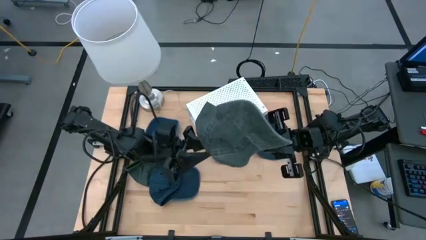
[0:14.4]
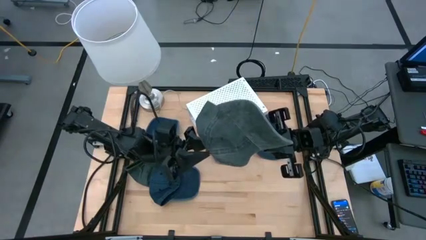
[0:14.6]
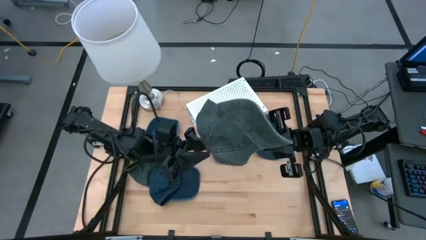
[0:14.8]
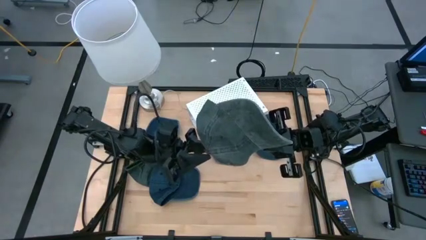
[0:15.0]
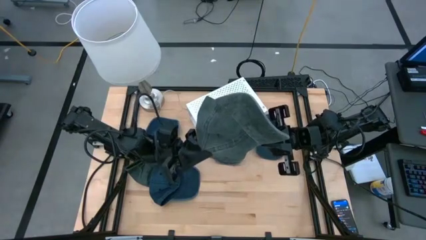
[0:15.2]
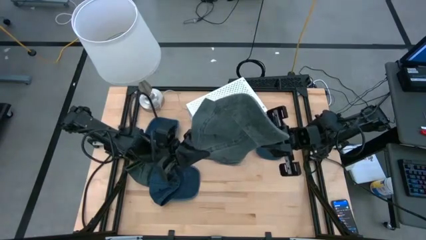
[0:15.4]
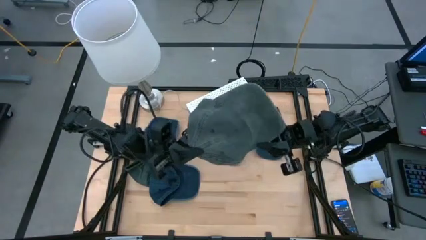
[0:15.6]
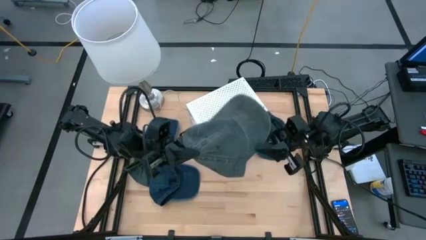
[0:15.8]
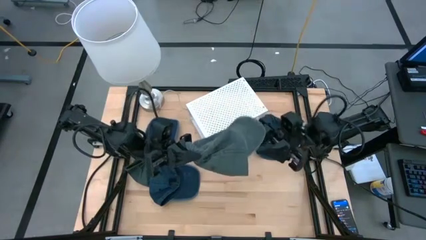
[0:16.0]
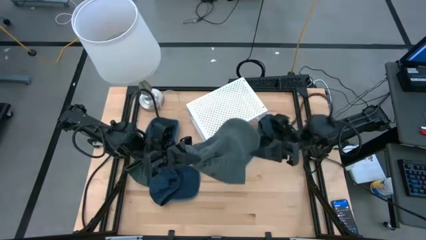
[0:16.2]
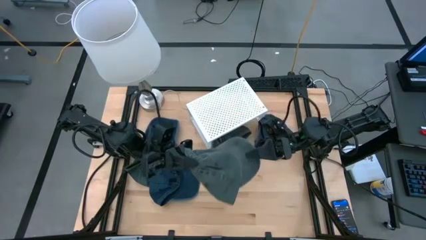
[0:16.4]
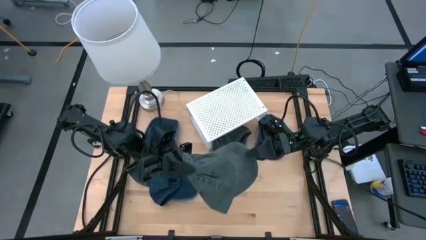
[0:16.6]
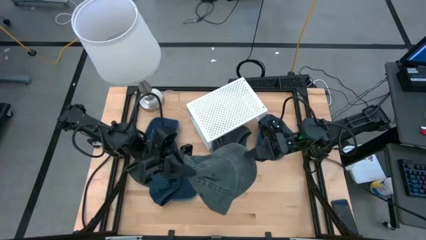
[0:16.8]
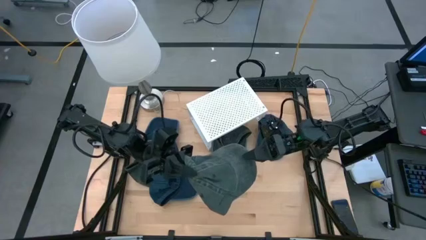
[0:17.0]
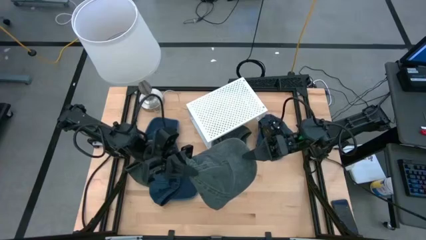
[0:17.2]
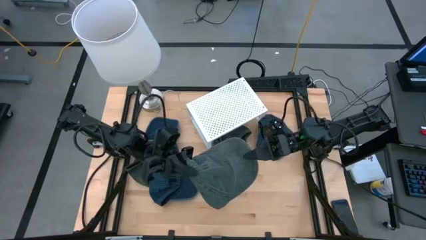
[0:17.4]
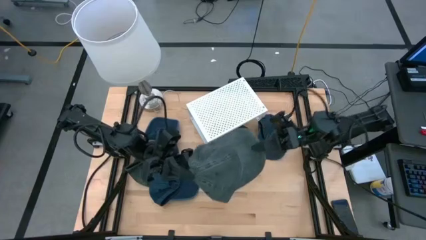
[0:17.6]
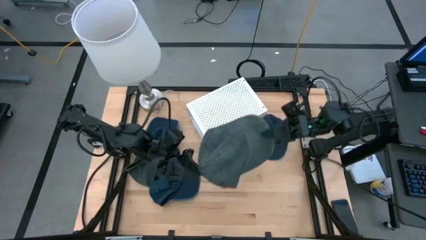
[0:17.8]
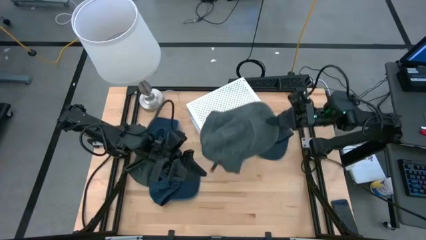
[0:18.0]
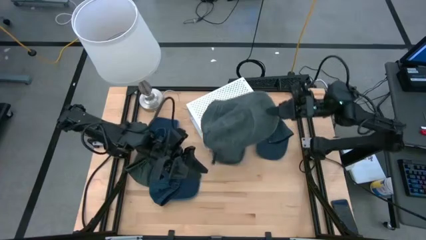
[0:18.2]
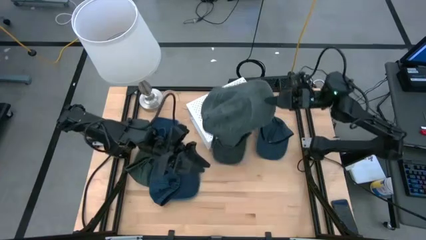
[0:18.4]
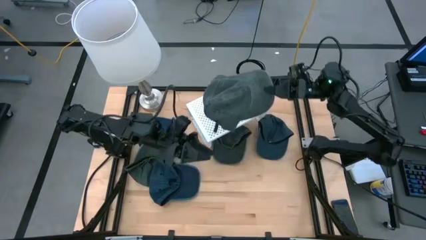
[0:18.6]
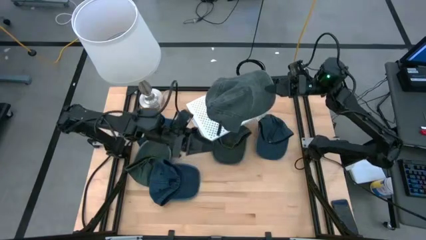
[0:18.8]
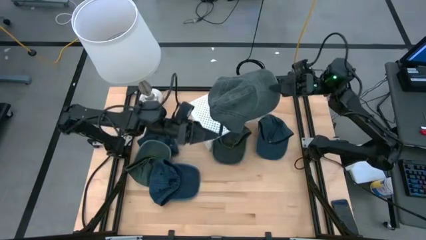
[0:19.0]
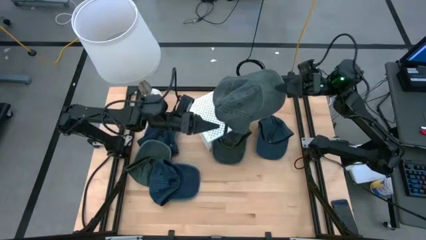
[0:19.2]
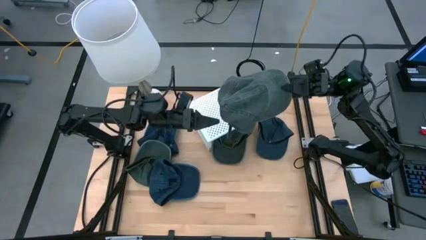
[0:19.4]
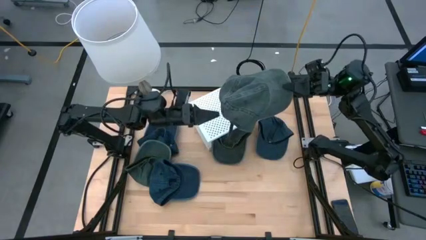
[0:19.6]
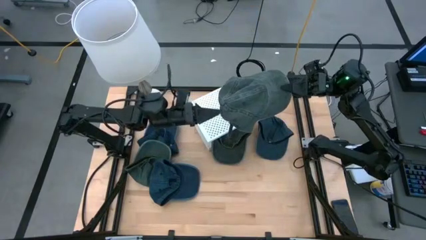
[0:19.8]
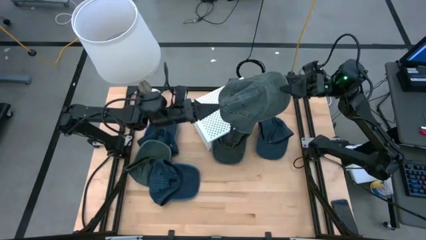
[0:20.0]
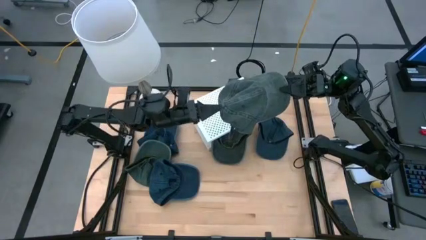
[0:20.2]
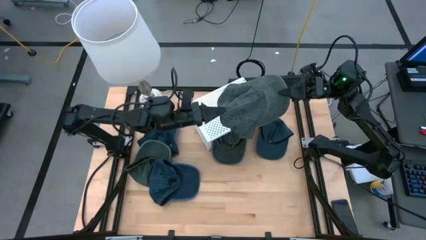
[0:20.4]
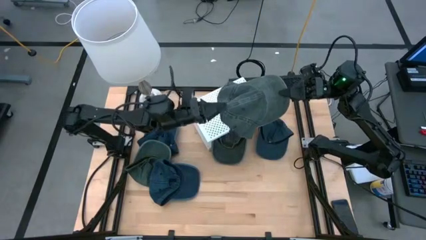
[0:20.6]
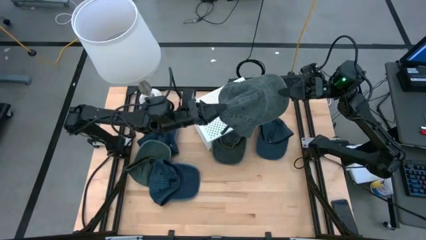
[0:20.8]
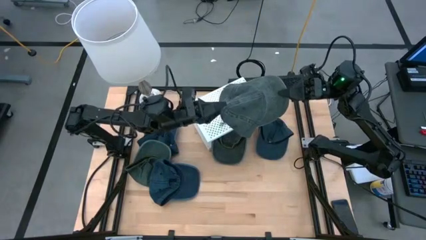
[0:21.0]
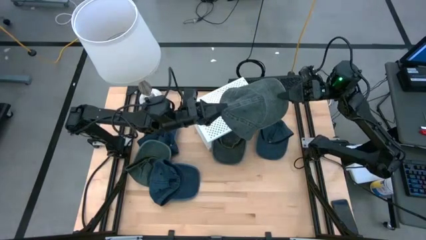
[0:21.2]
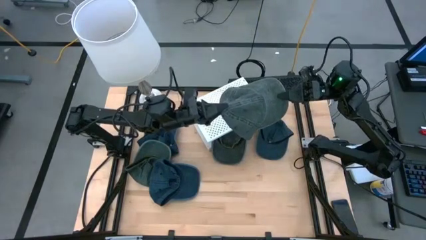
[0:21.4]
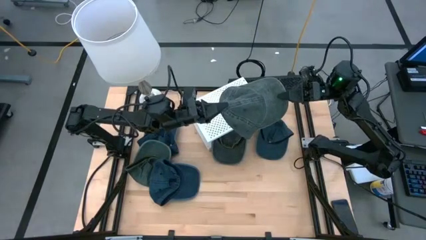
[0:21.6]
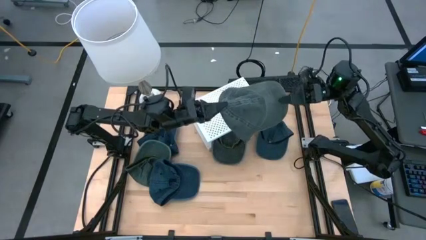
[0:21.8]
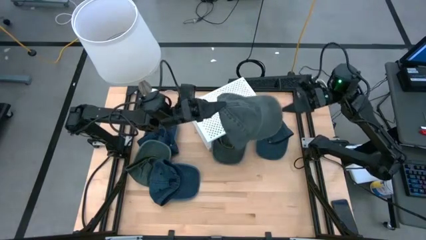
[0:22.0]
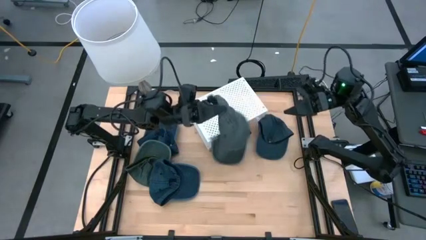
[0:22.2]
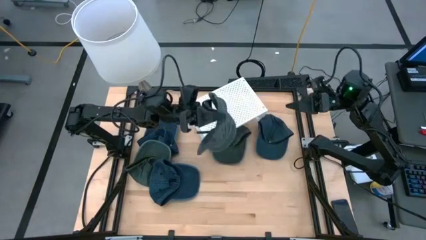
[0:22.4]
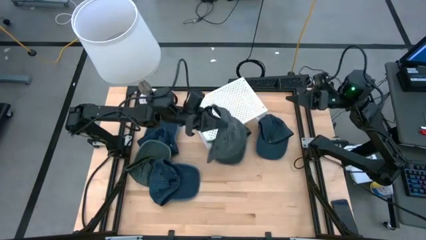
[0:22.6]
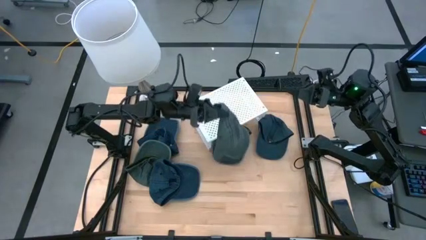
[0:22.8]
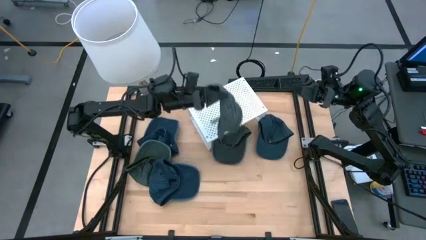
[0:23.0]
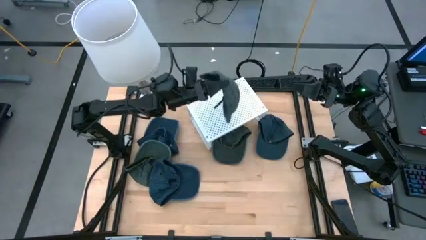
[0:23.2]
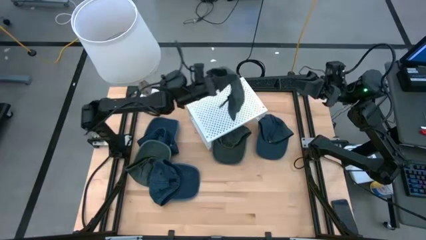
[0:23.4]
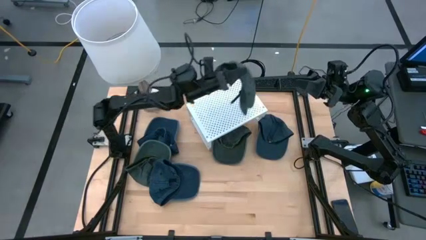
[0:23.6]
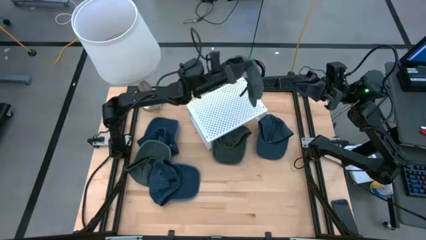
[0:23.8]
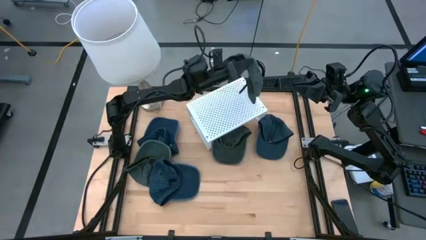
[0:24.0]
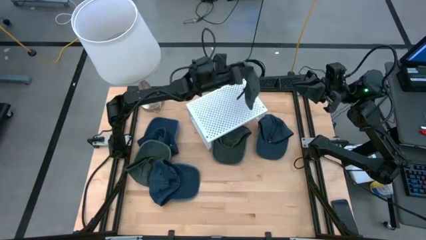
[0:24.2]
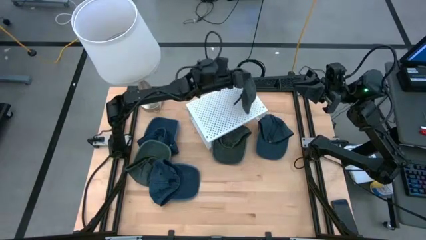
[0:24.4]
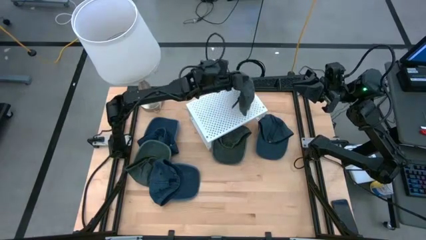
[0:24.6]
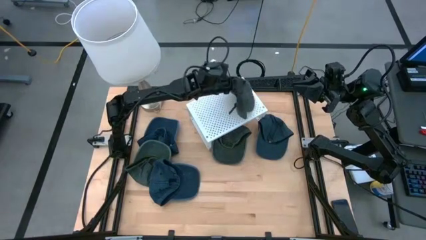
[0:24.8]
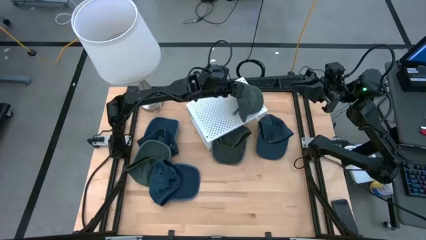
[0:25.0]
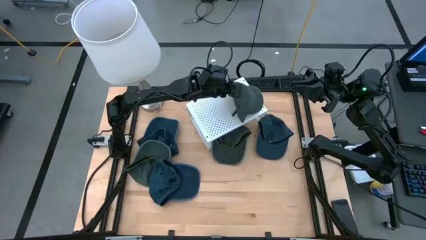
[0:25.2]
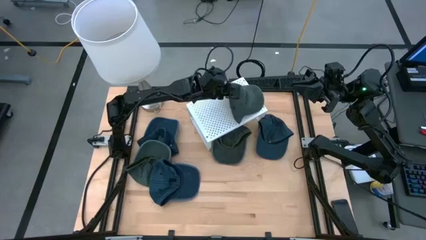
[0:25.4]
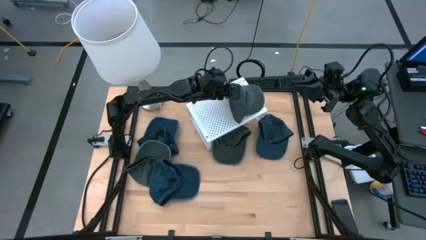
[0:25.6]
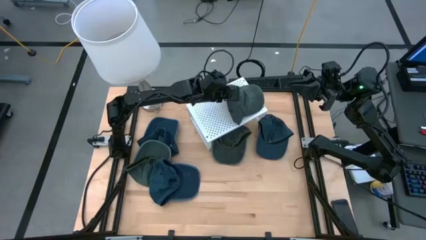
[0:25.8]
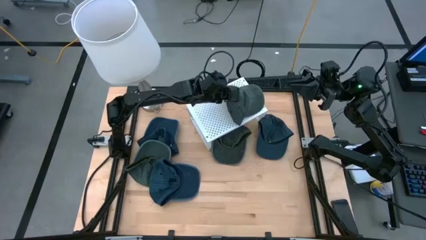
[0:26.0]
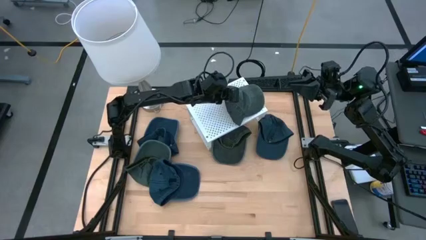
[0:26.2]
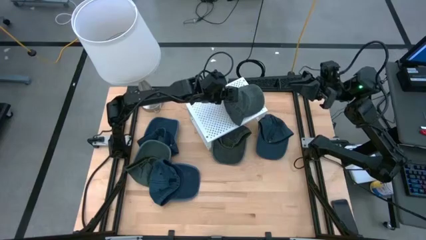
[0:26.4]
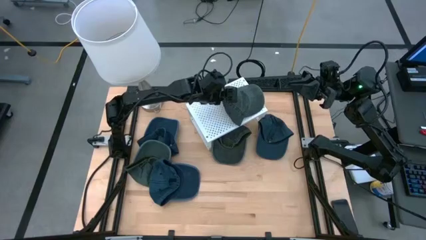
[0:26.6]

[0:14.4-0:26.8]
Task: Pick & Place hat
Put the green cap on the shelf
